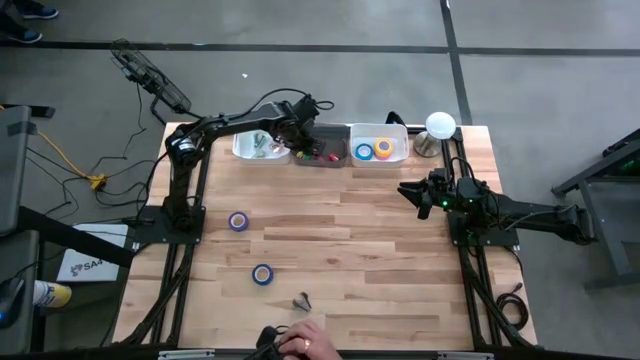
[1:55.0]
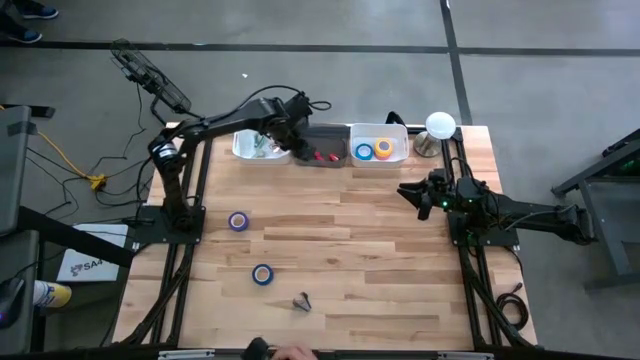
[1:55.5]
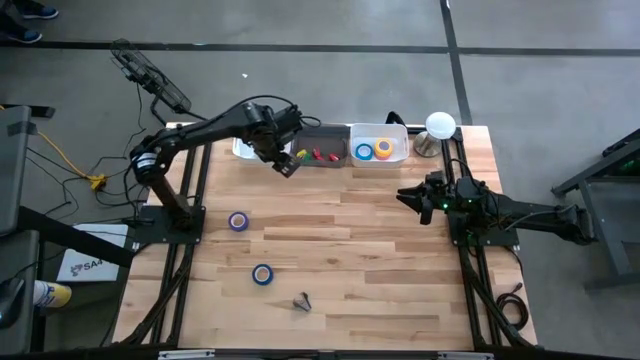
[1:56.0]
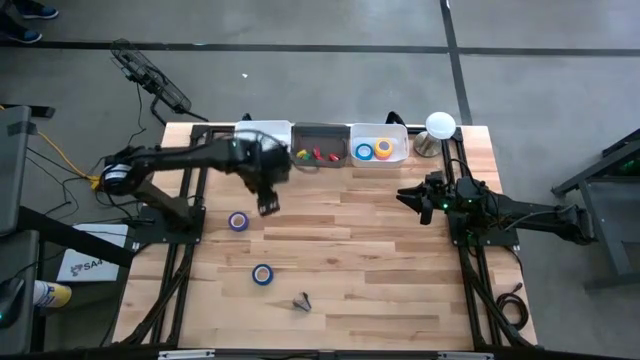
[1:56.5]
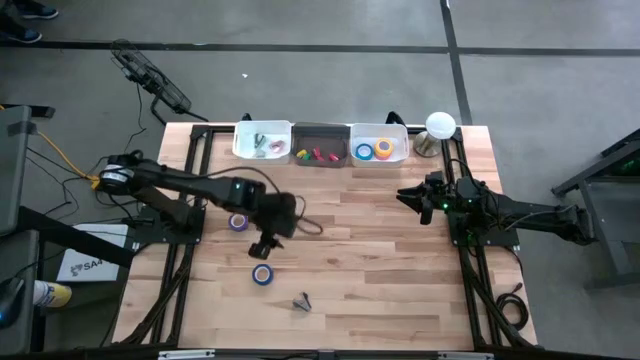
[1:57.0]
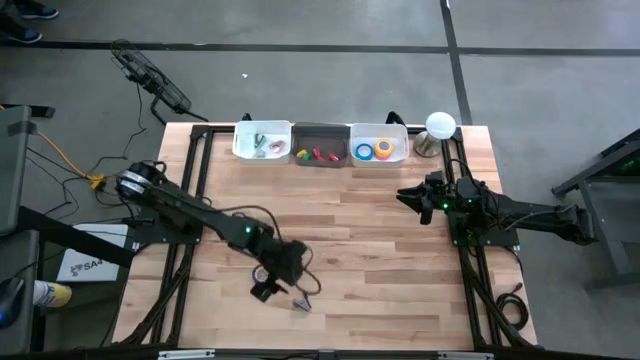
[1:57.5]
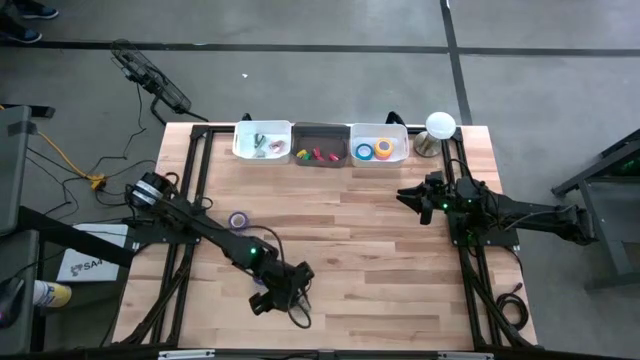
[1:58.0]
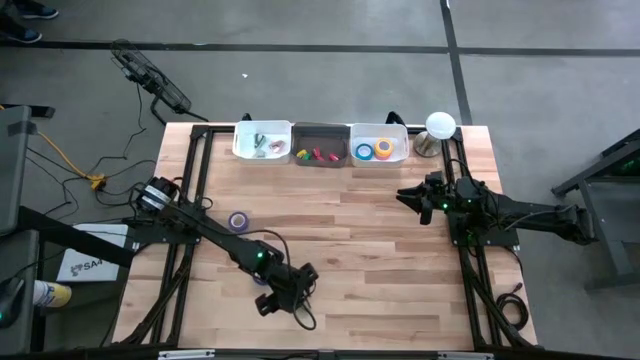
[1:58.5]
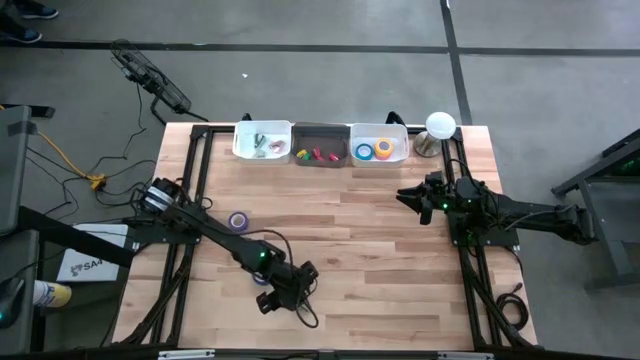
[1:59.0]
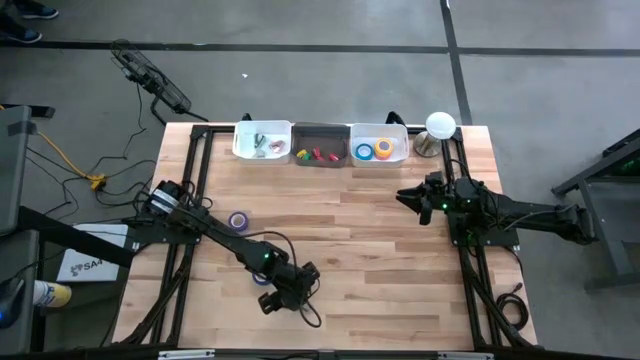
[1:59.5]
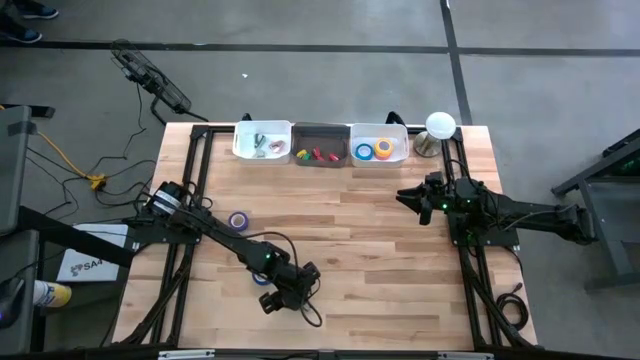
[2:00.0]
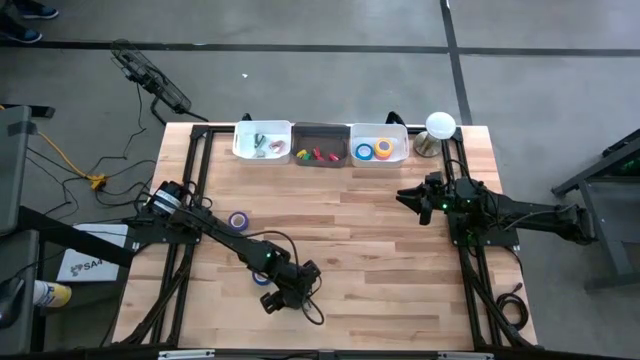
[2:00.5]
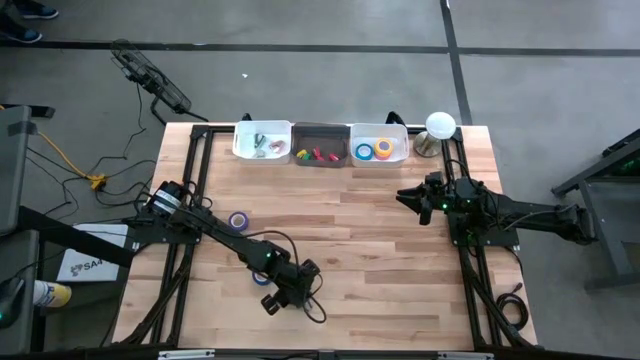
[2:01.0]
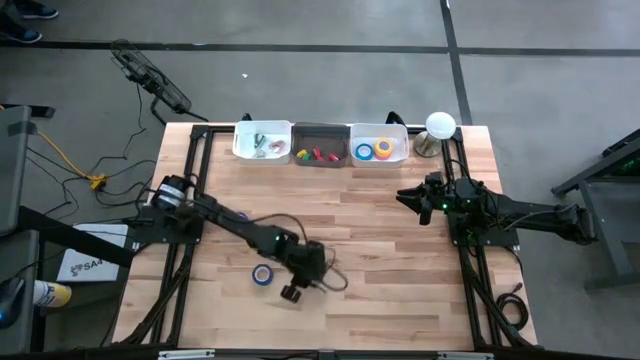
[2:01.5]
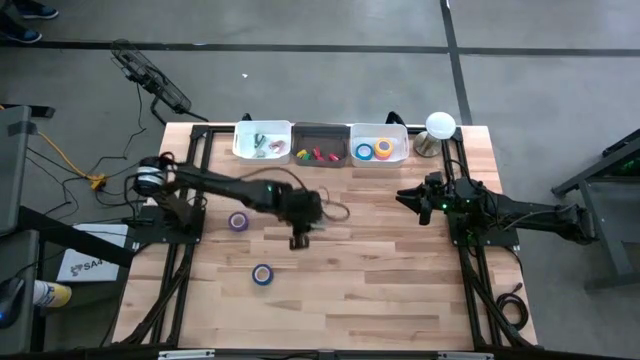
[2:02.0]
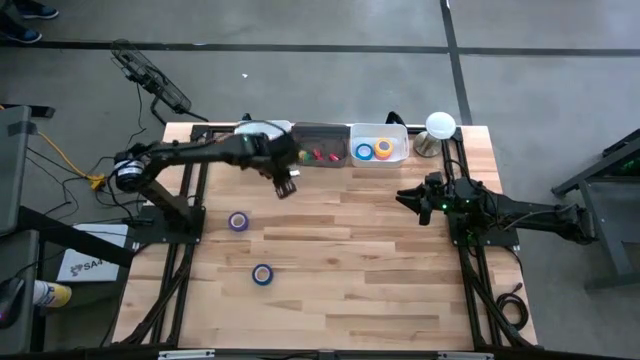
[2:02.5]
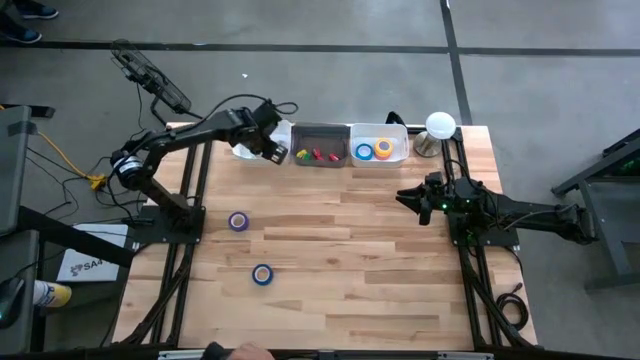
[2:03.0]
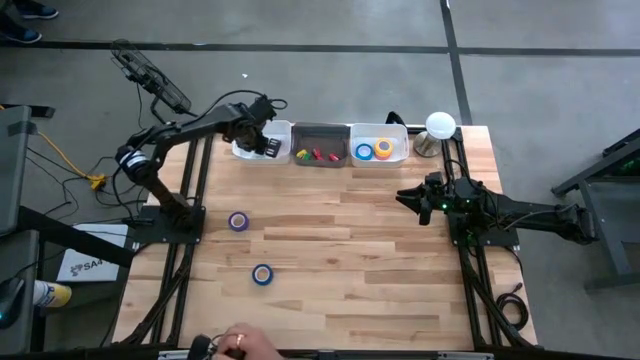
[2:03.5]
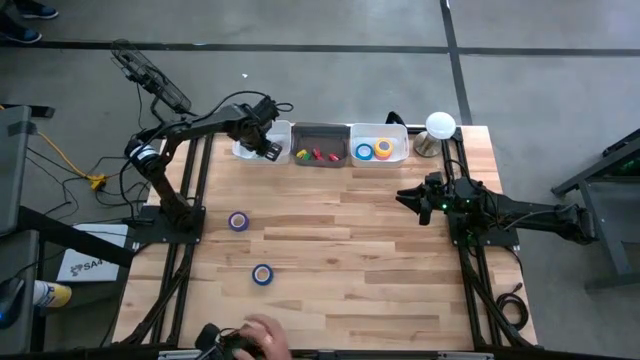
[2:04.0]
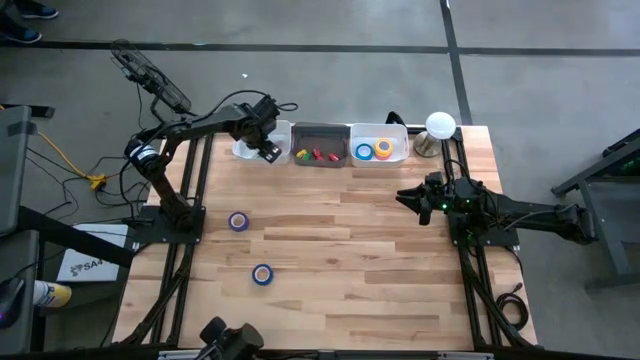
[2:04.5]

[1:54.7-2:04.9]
Task: Pick and place Stapler, Stapler remover, tape
Put the black staple remover into the left white bin

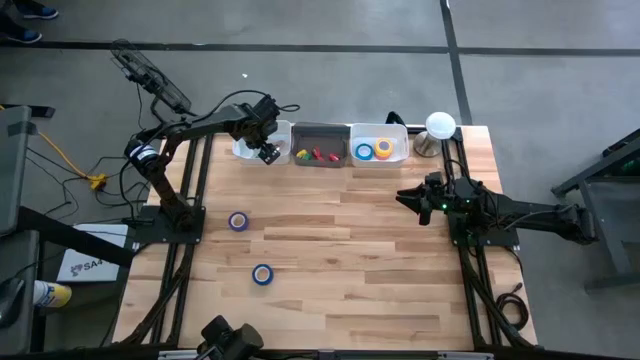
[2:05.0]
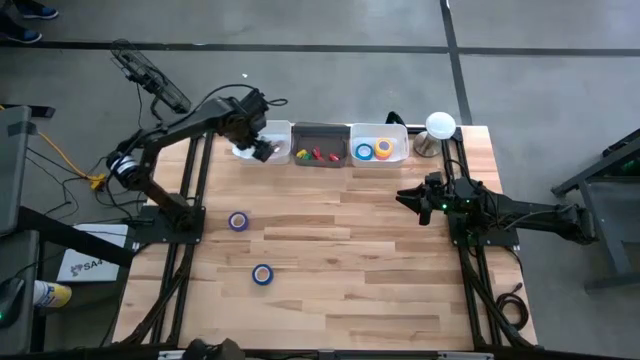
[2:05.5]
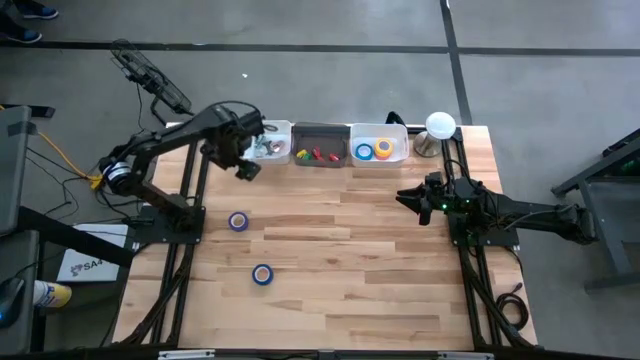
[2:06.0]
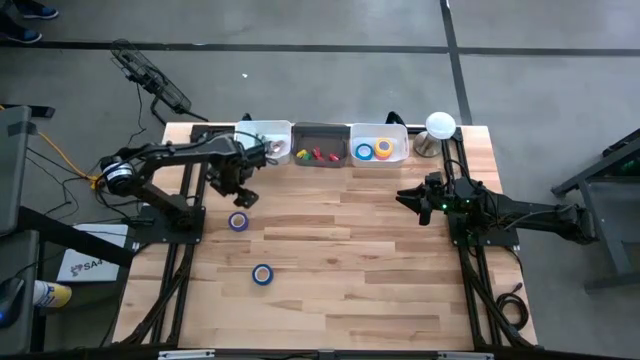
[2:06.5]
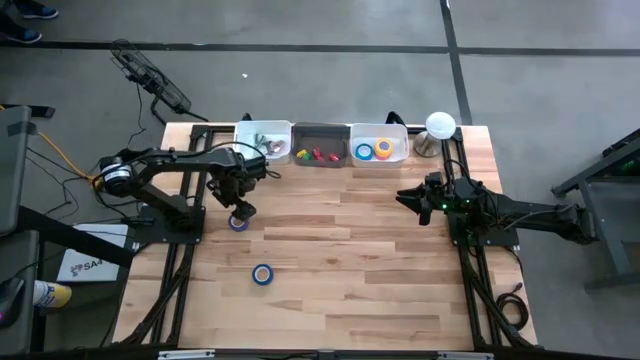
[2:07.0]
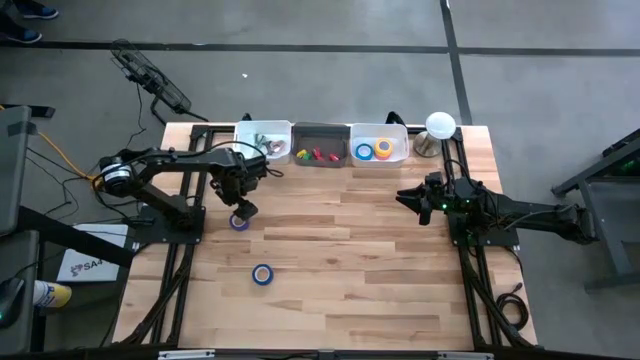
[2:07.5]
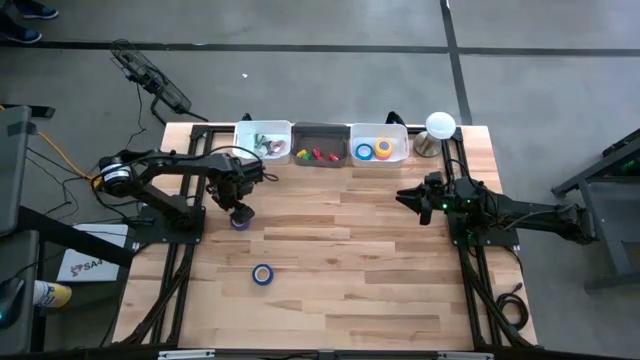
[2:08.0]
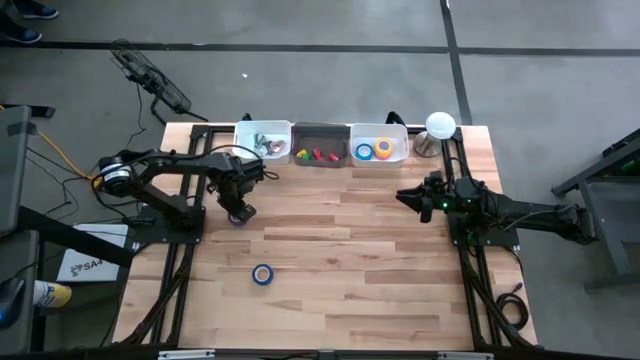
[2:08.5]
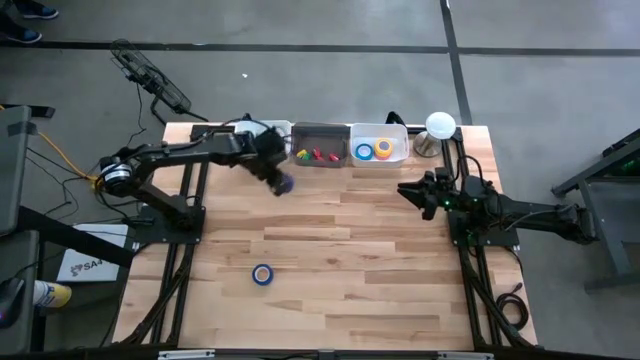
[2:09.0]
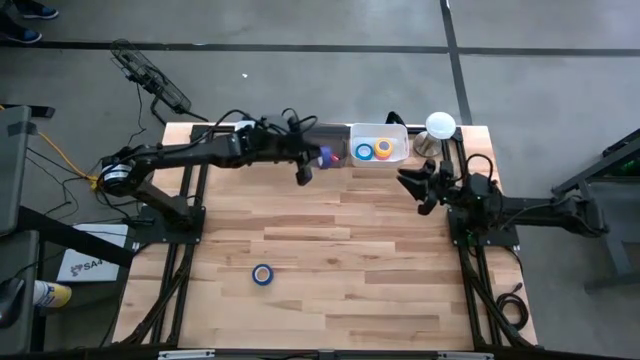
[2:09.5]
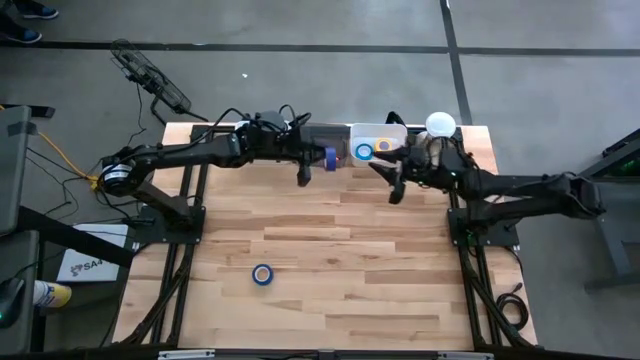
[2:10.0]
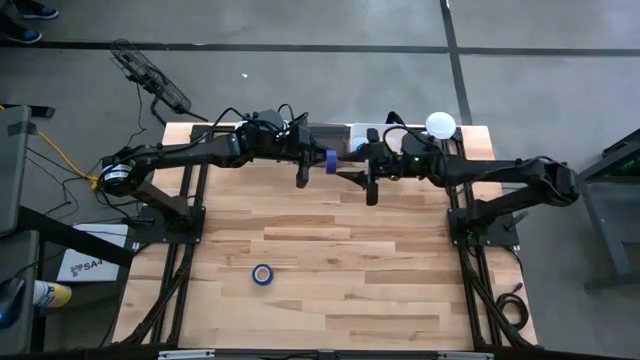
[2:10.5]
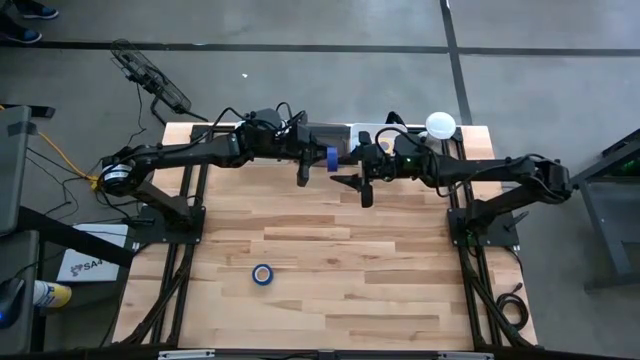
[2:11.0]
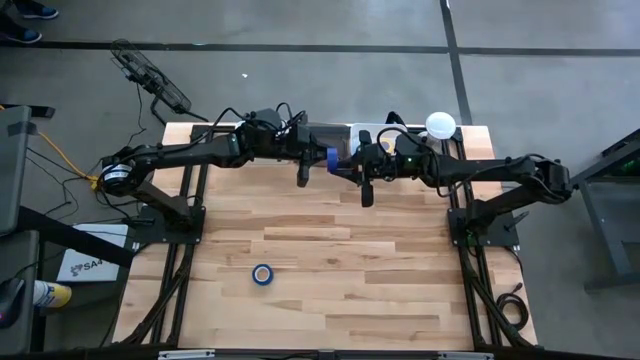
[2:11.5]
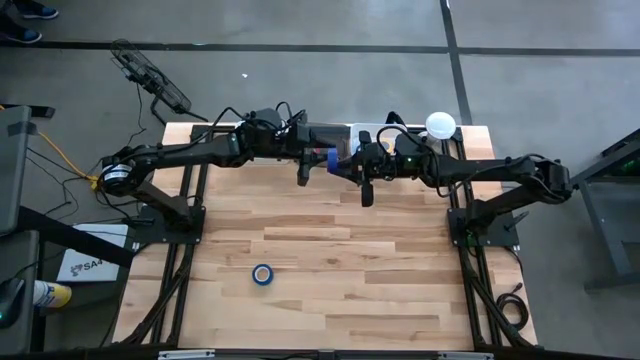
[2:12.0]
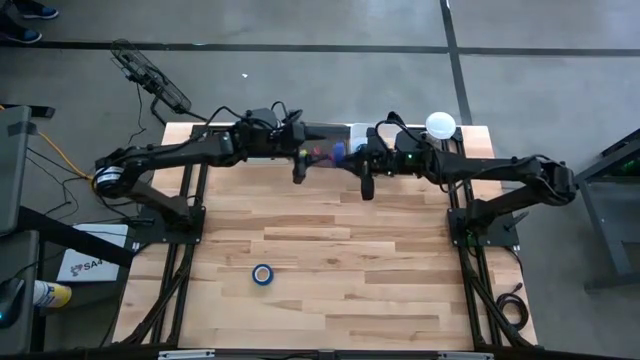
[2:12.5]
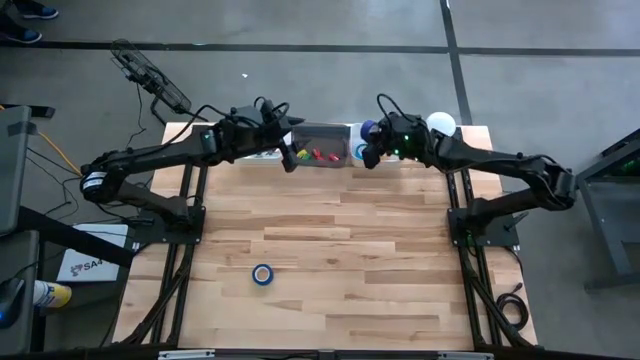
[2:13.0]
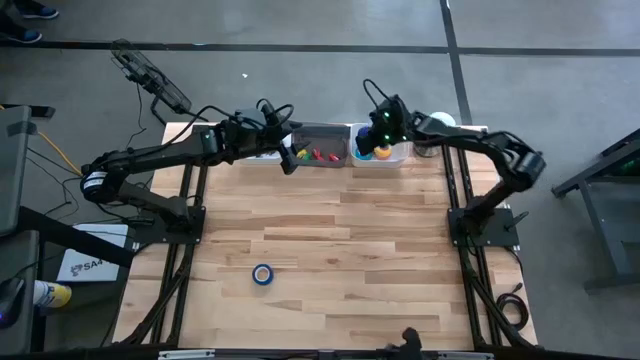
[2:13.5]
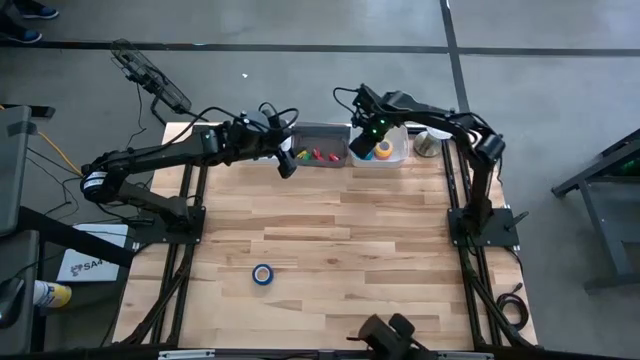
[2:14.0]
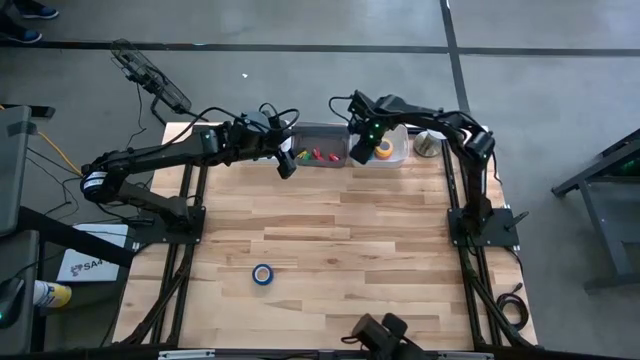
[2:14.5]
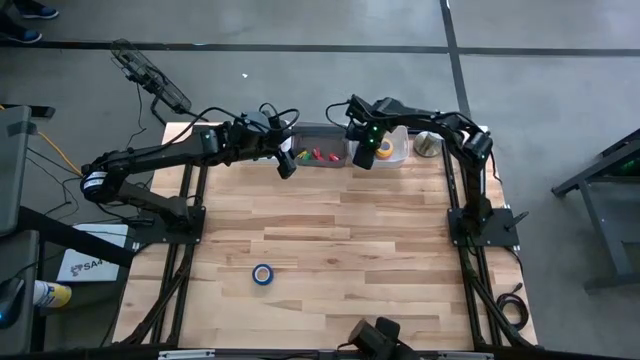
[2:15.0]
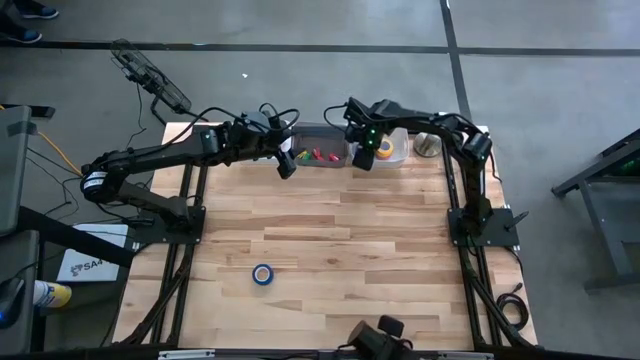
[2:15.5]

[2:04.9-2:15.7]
Put the violet tape into the right white bin

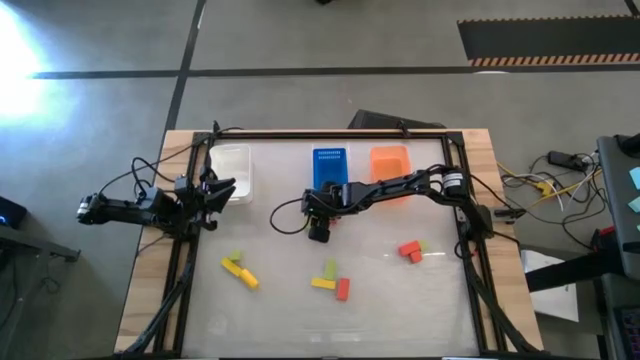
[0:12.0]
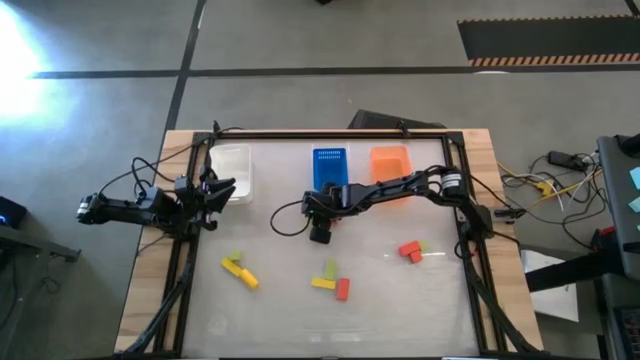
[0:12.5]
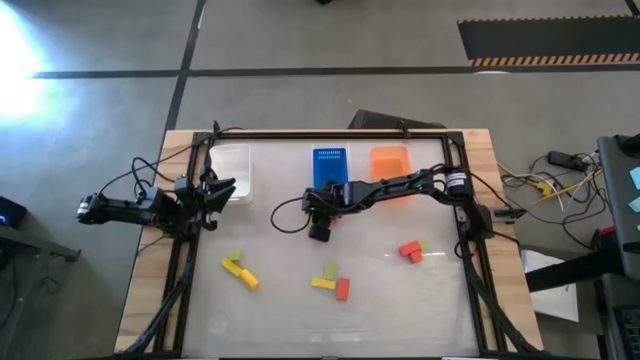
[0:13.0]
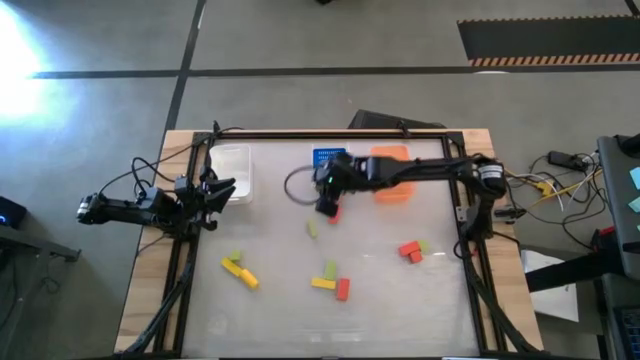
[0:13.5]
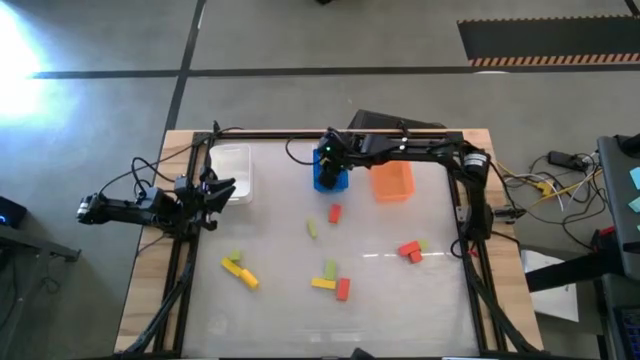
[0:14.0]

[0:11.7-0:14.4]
Task: Sort & place blocks by color
Put the yellow block into the blue bin
